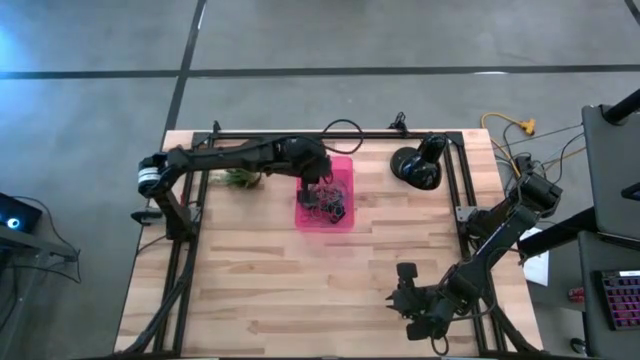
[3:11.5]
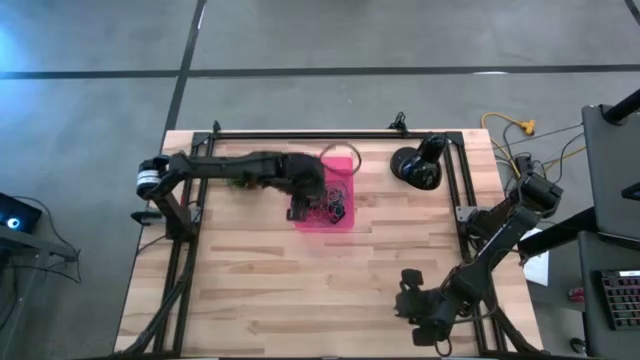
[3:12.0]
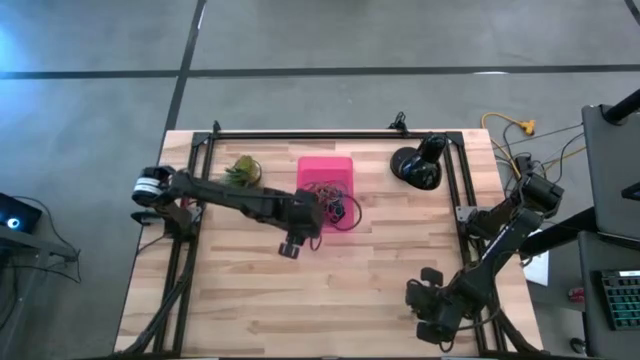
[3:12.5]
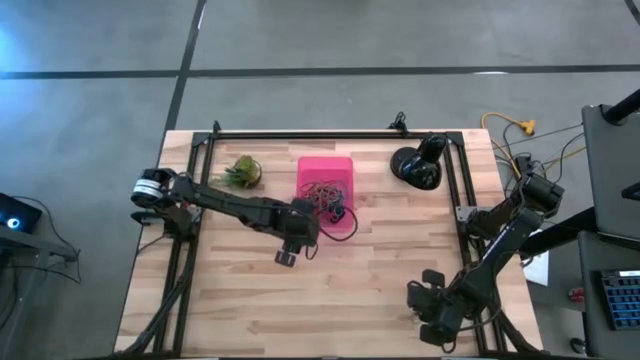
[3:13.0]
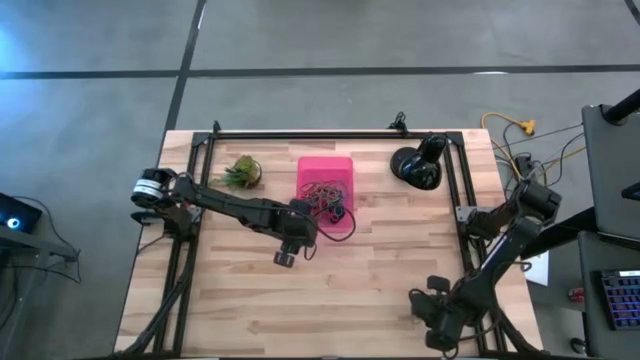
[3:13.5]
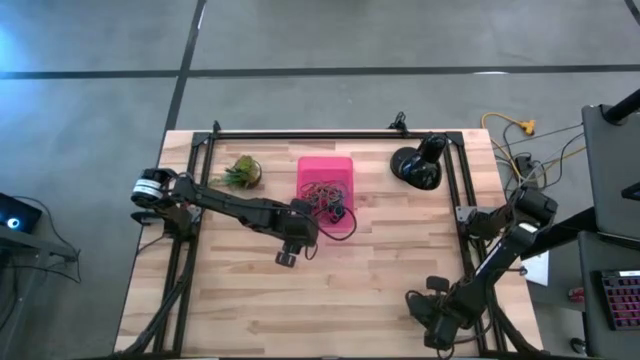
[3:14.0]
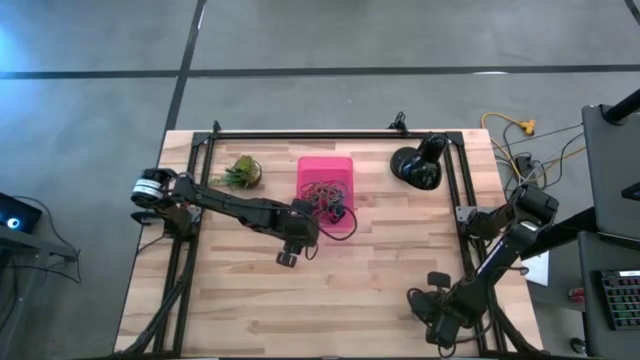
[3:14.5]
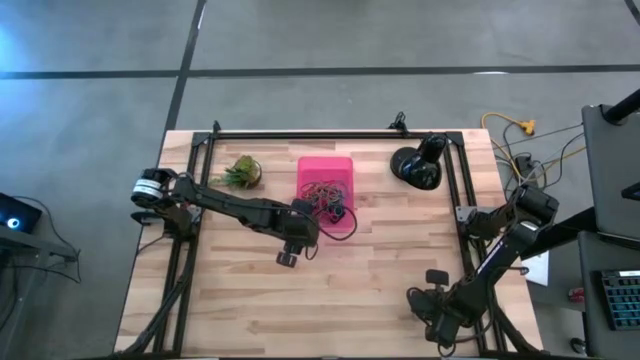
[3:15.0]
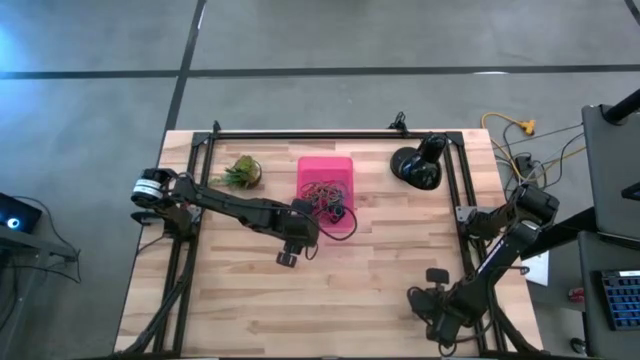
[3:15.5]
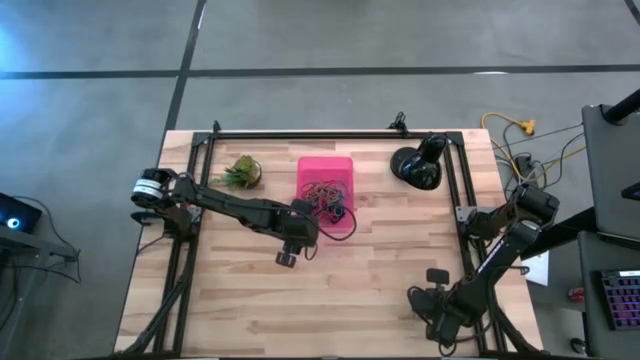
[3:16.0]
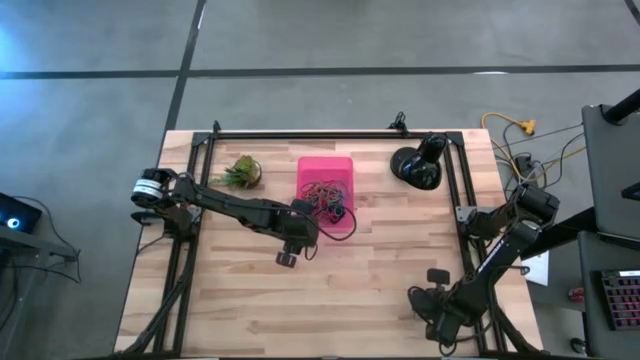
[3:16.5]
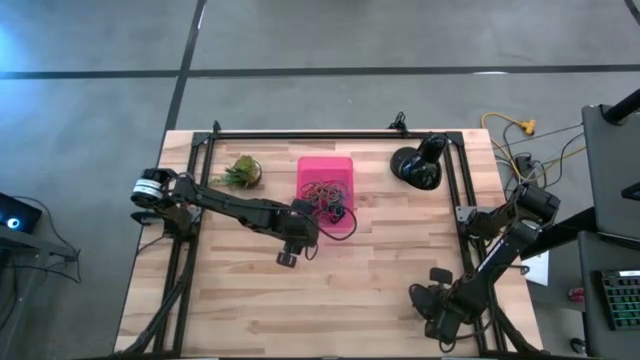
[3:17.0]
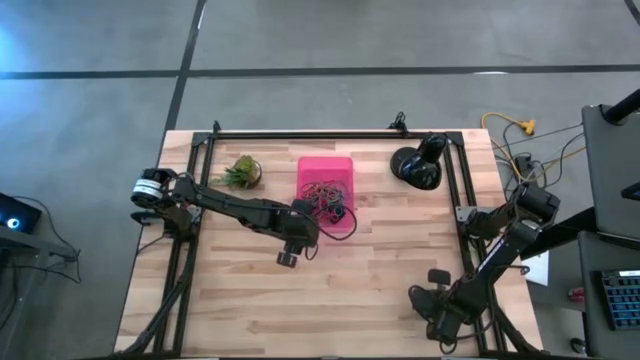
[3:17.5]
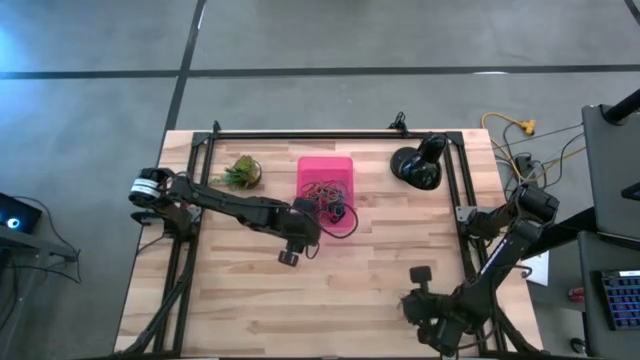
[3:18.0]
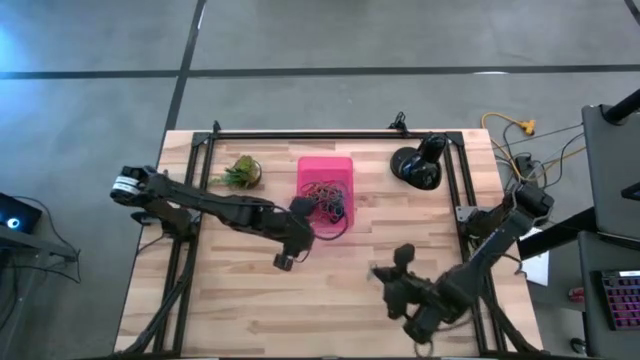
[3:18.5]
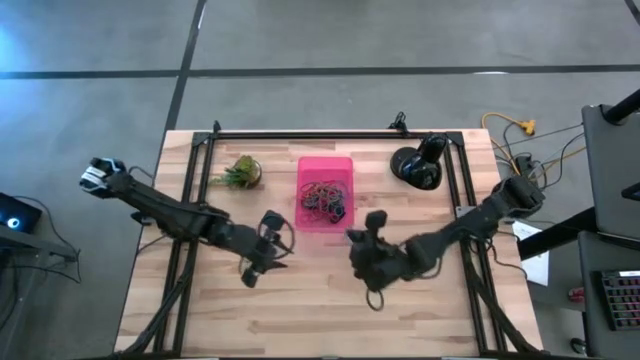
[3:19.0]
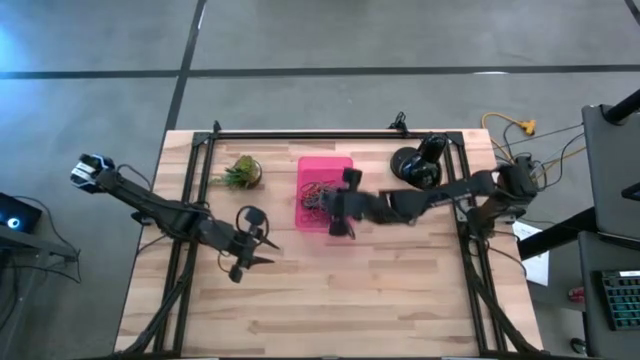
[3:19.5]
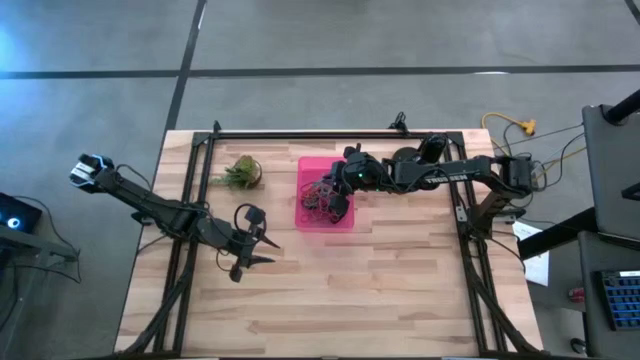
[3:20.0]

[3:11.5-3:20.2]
Task: Pick and place rubber bands into bin
Put the blue rubber bands into the pink bin

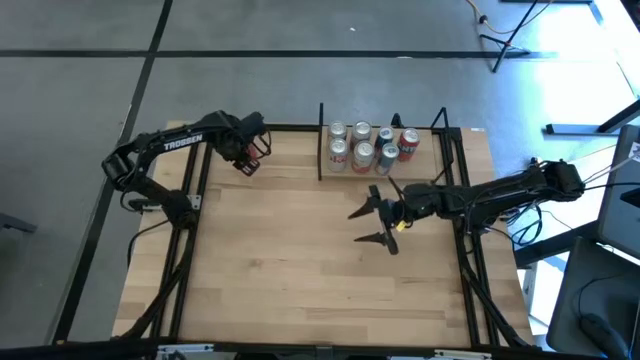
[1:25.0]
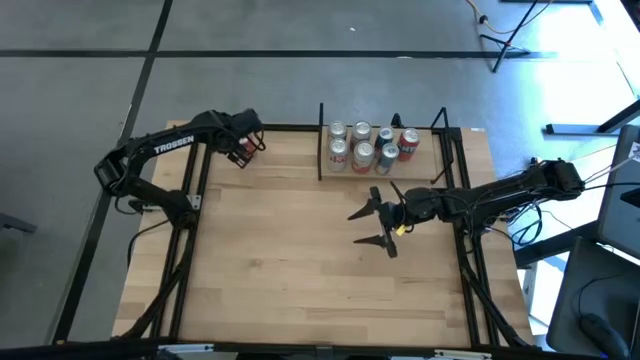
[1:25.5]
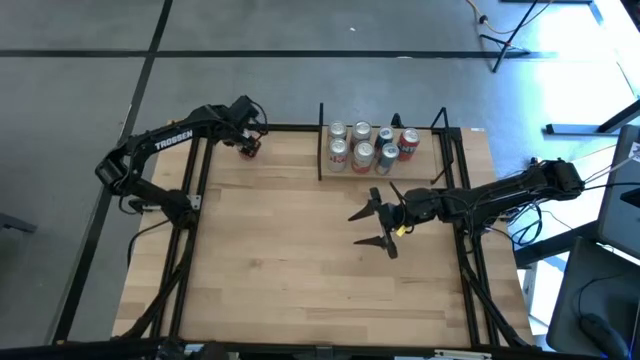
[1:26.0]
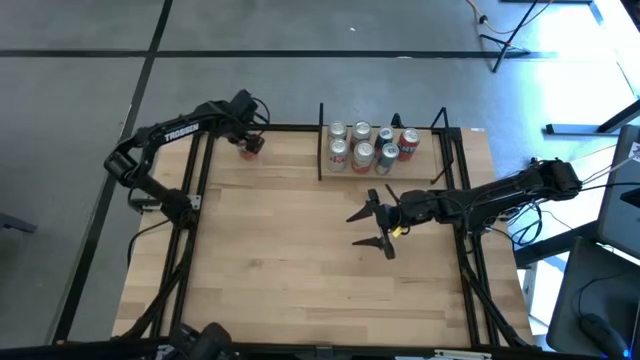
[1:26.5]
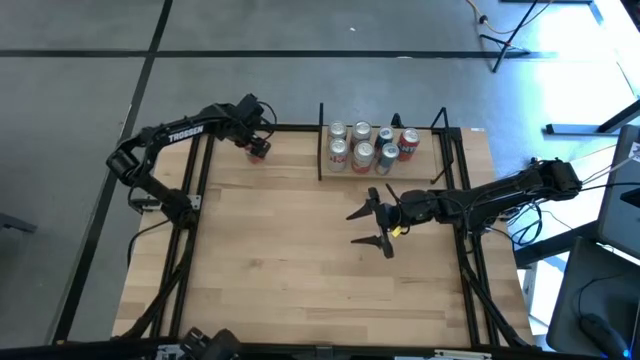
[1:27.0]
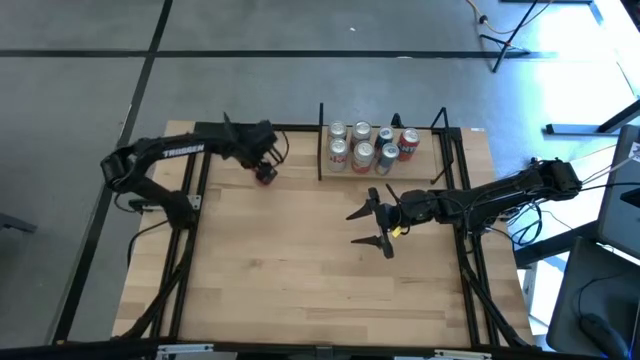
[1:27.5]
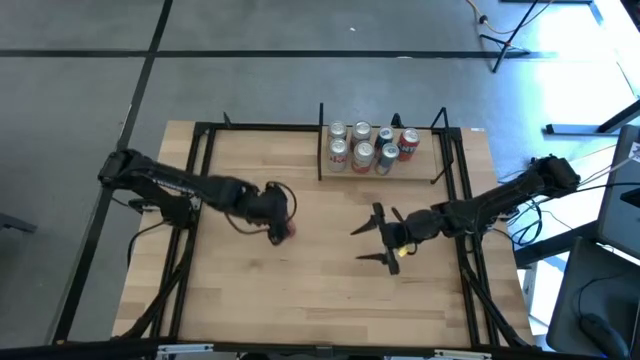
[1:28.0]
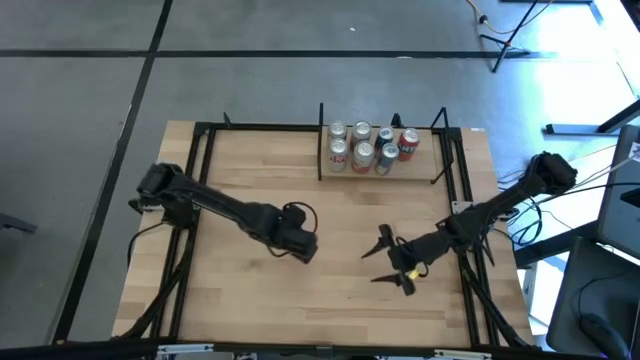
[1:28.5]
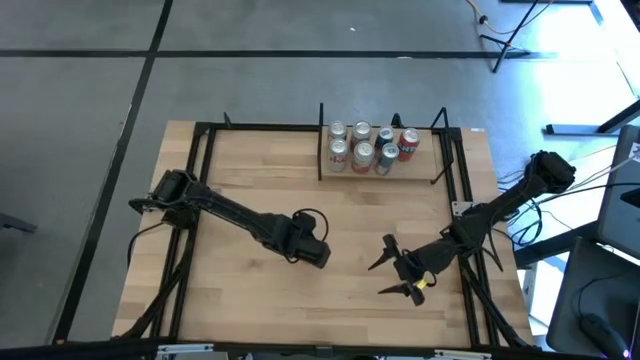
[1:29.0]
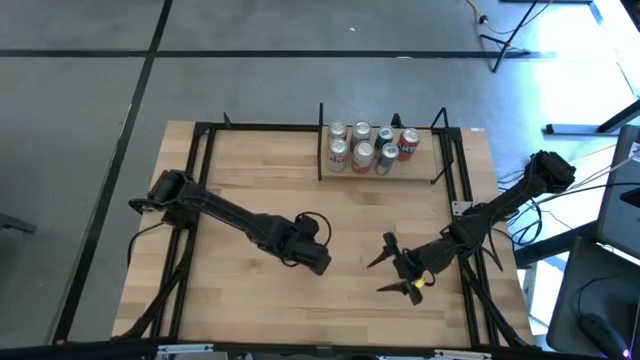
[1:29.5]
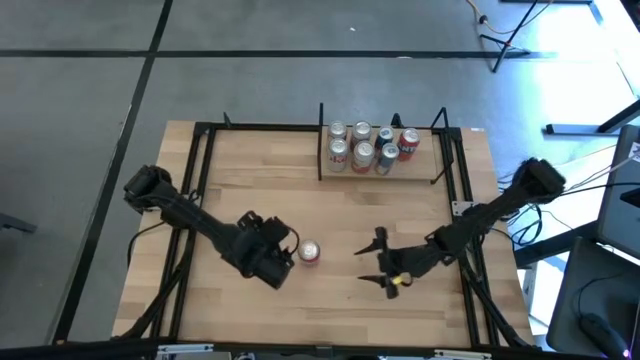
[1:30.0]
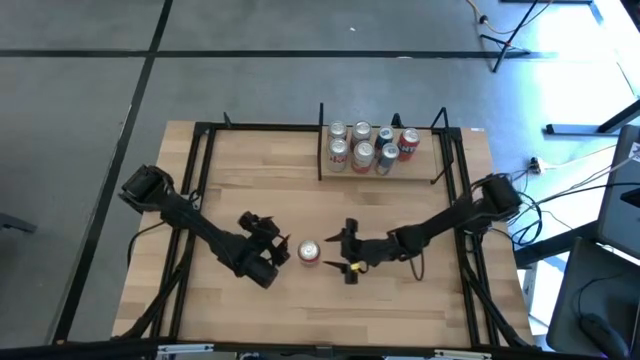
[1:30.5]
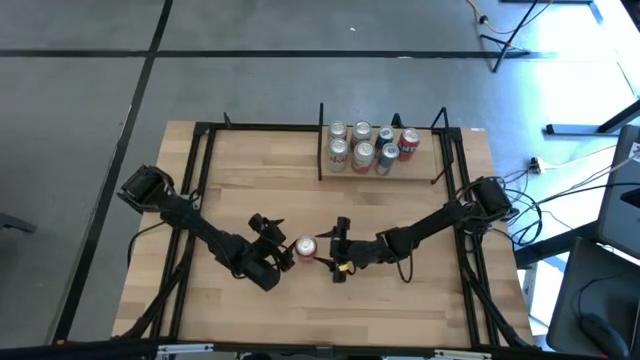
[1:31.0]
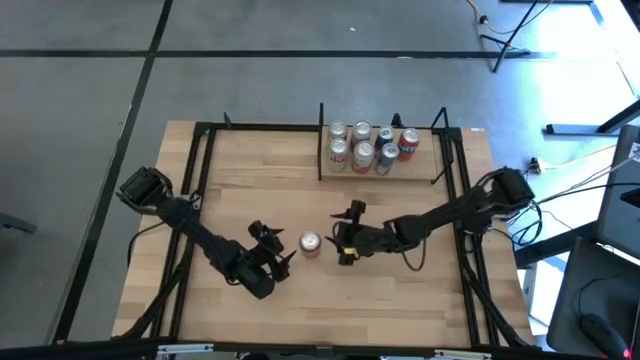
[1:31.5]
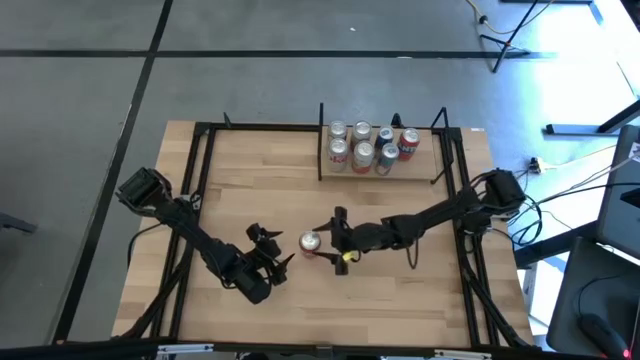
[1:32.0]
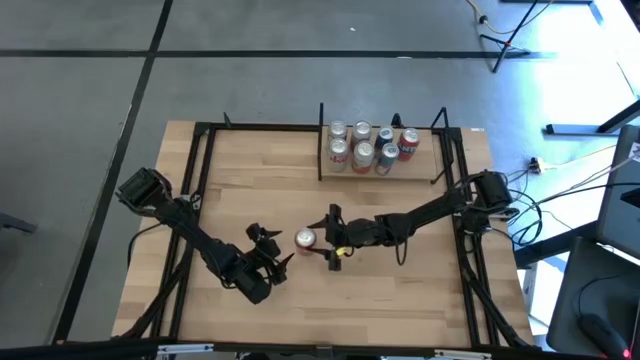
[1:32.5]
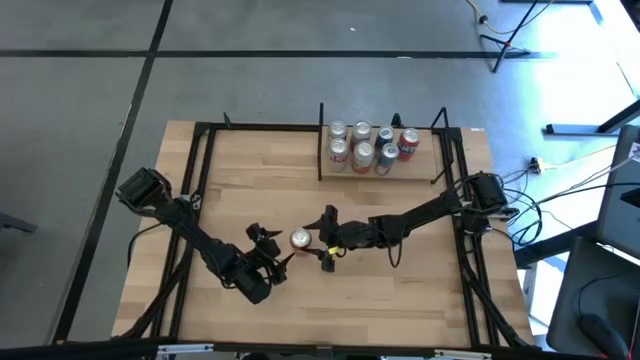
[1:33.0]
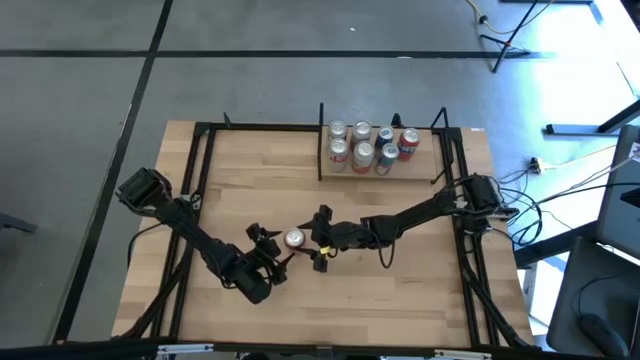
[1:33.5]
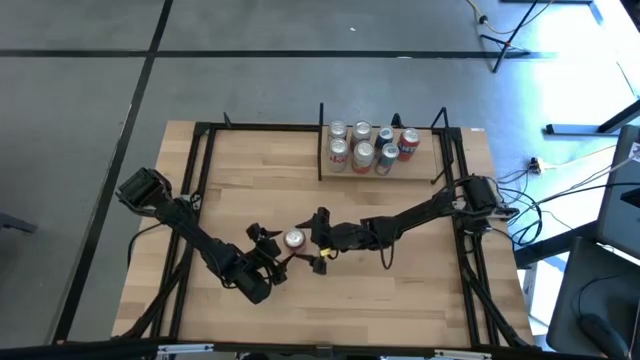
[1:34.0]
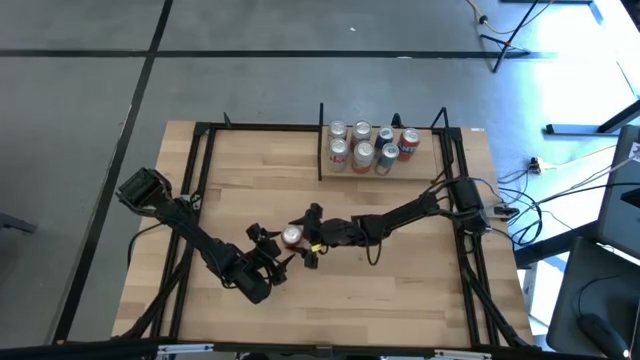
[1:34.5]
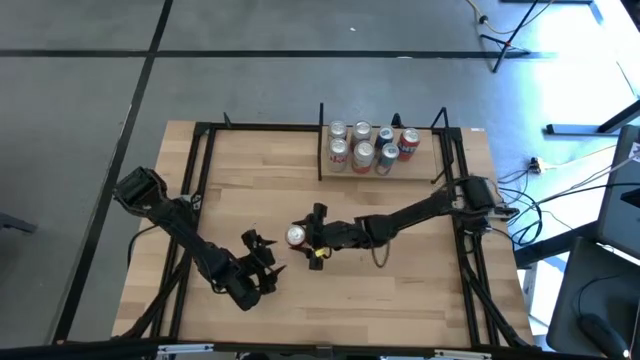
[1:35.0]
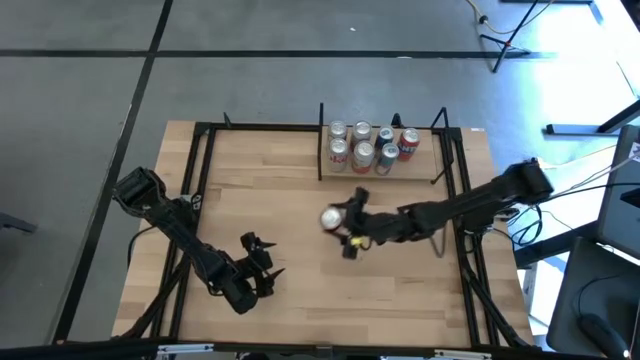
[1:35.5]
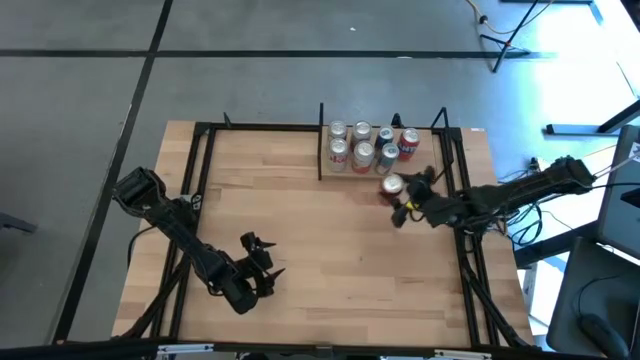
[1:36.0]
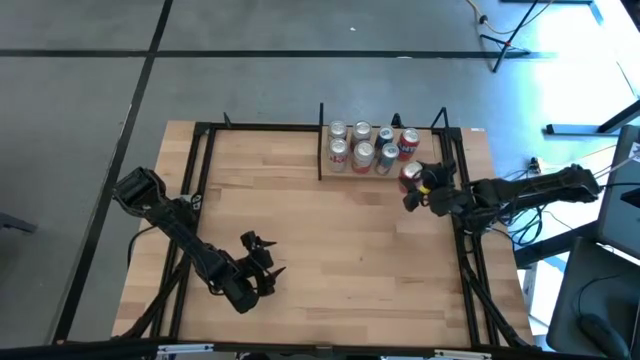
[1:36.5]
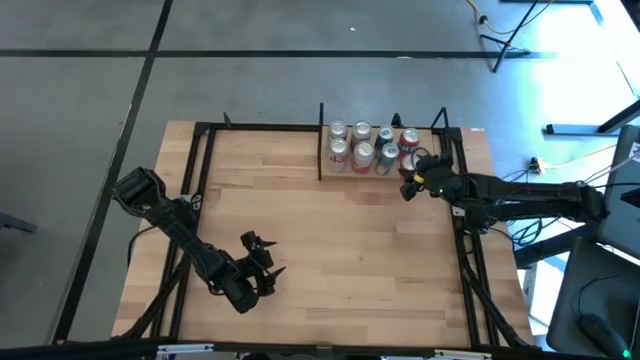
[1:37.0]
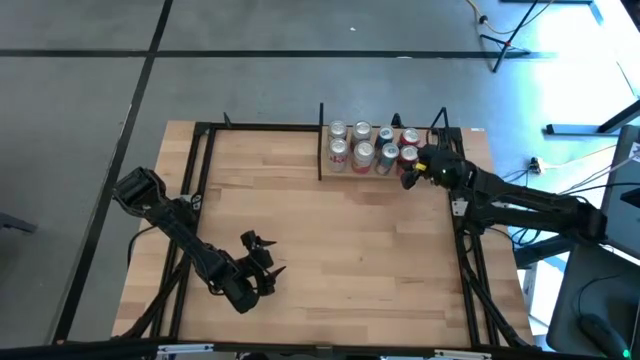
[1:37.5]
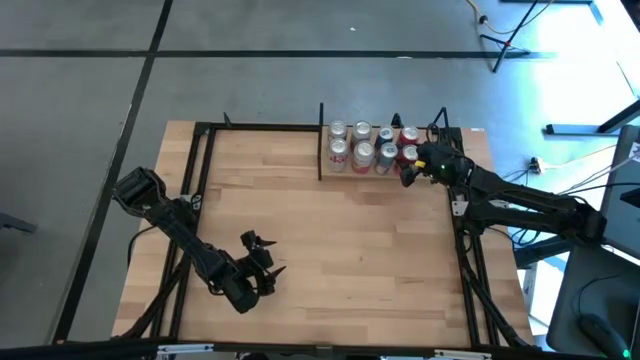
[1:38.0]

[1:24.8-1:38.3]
Task: Place canned beverage on shelf
Put the red soda can on the shelf aligned with the other red soda can
